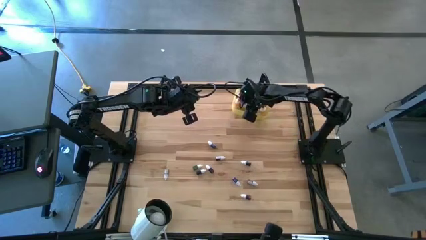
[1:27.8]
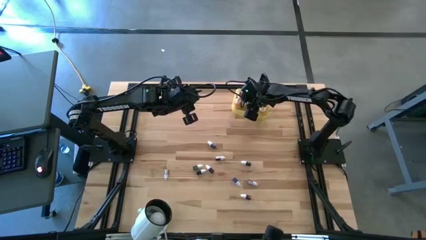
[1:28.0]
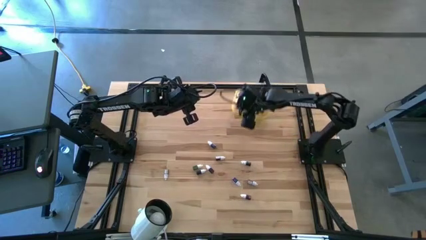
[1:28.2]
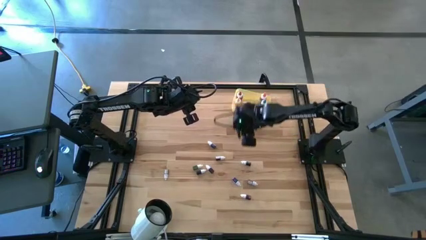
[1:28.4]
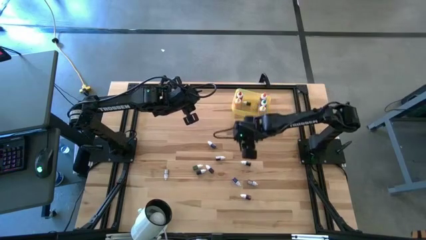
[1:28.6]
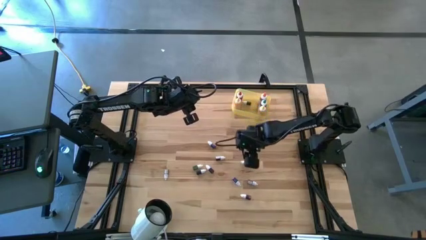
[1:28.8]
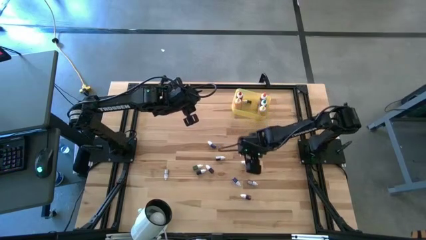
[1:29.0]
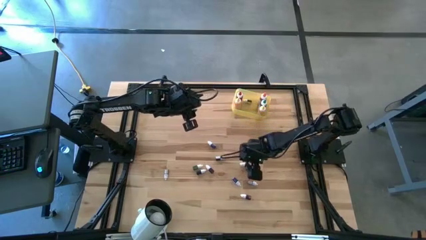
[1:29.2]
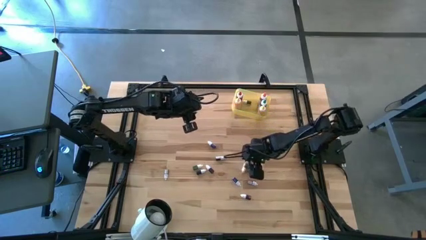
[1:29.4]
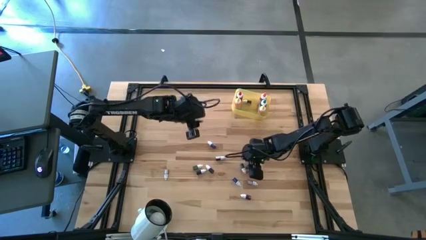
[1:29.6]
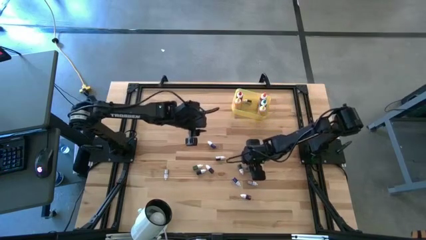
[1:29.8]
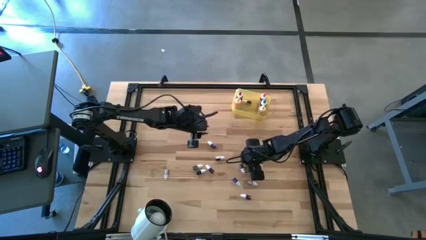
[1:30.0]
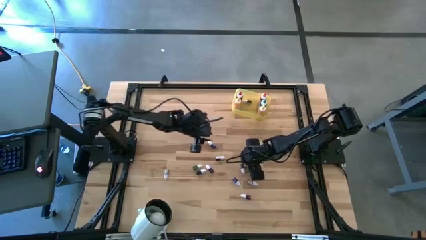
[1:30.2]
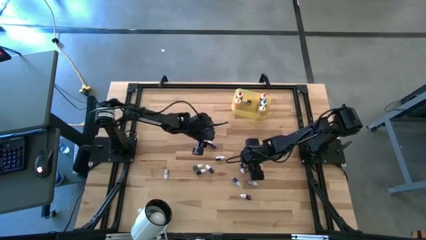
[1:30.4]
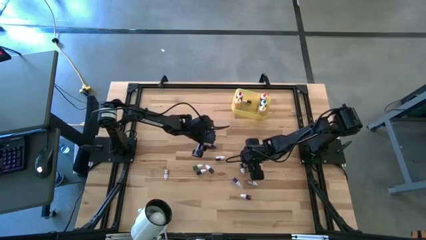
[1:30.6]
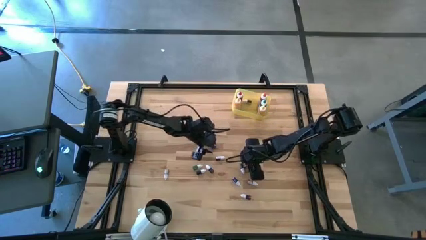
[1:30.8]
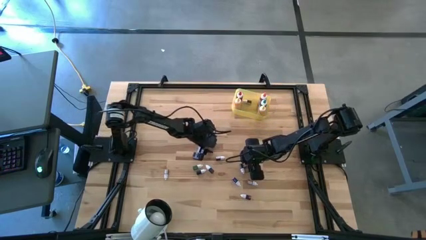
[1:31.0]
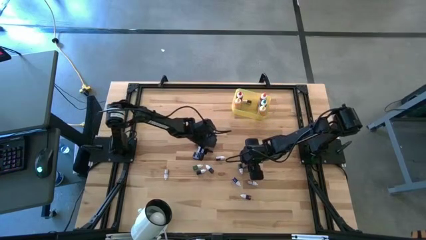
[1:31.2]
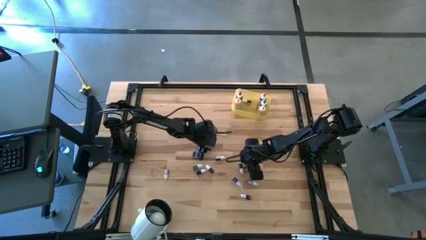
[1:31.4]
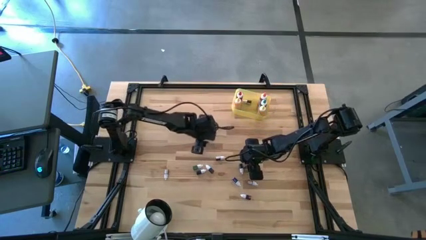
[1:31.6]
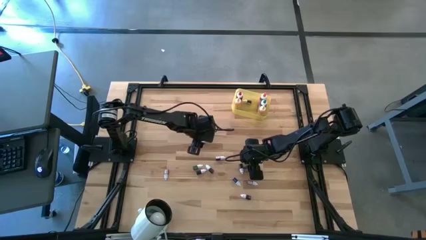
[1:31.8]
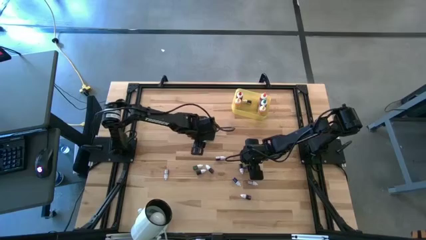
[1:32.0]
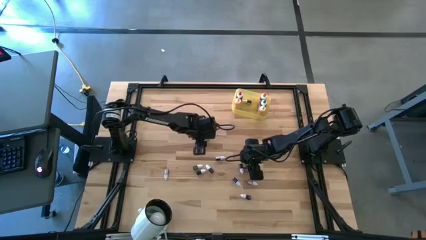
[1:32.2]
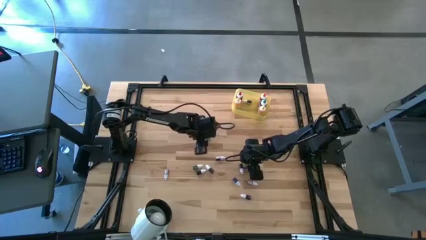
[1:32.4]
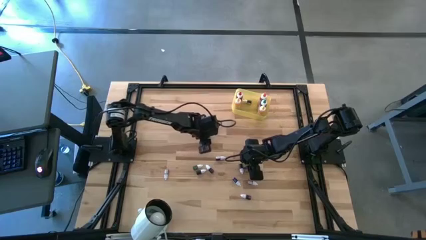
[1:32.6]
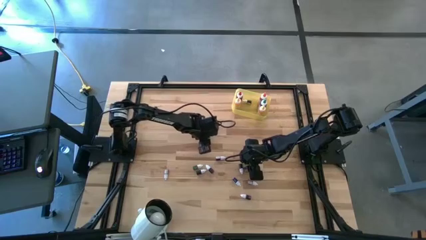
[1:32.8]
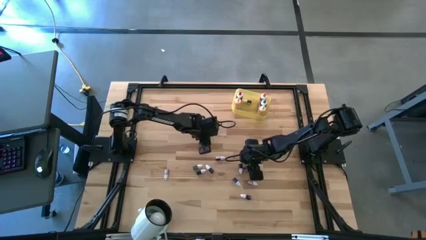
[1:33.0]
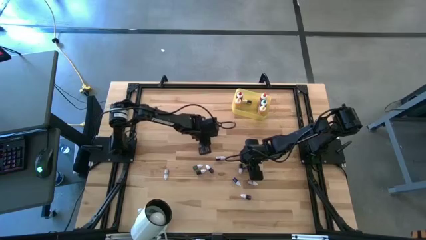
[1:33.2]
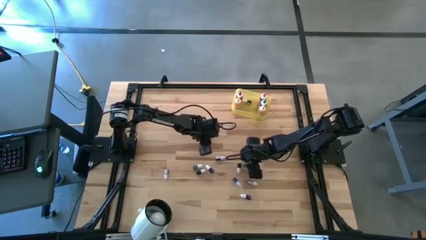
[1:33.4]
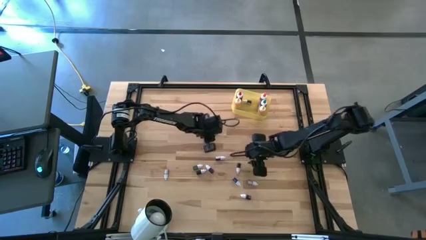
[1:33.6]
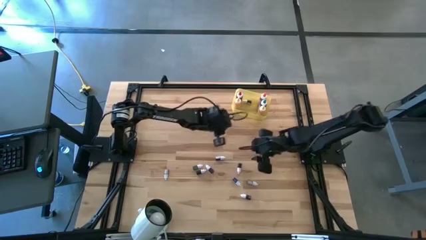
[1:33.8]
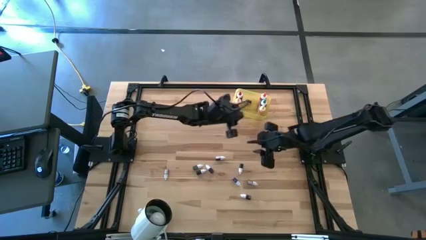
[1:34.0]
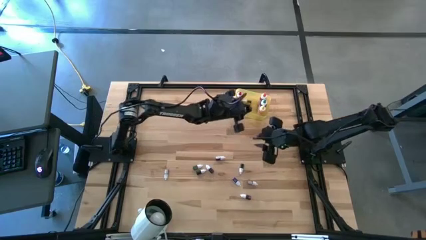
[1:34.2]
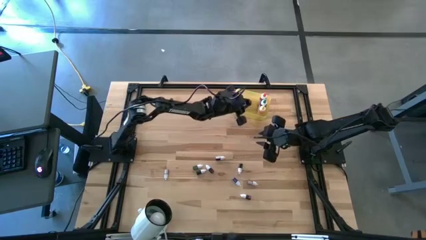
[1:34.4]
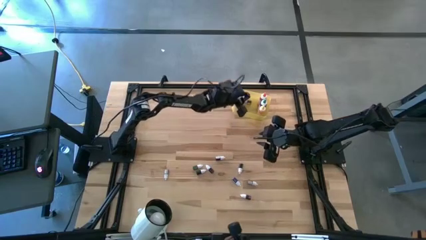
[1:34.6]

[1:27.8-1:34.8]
Task: Pick & Place food coloring
Put the small green food coloring bottle into the yellow bin

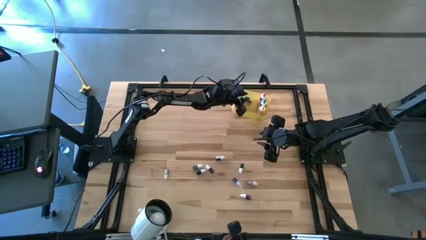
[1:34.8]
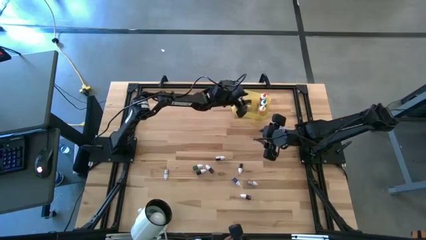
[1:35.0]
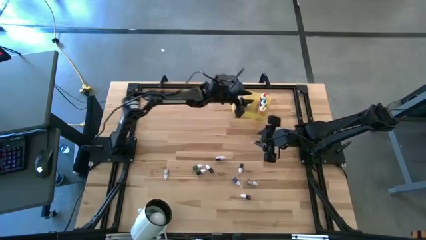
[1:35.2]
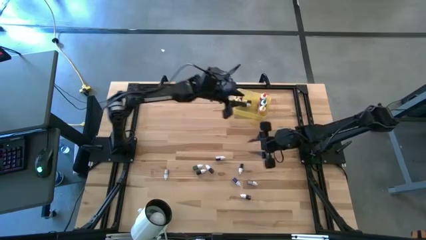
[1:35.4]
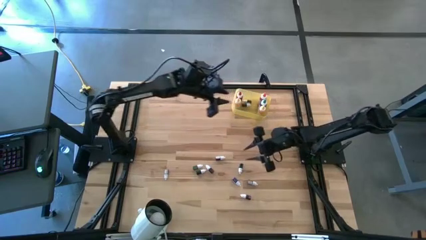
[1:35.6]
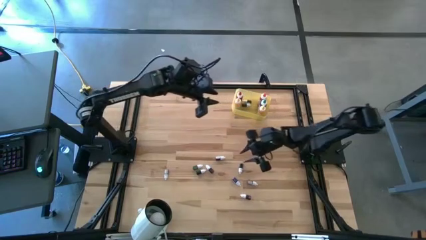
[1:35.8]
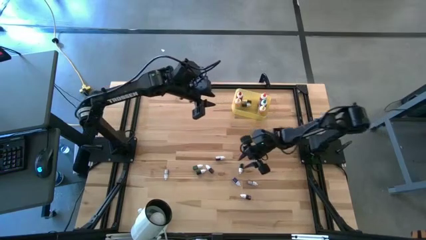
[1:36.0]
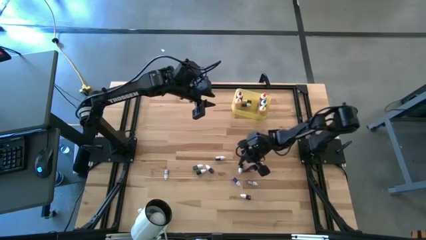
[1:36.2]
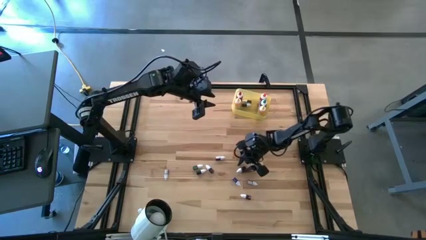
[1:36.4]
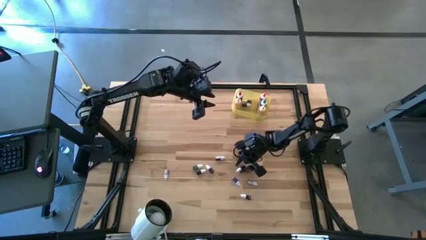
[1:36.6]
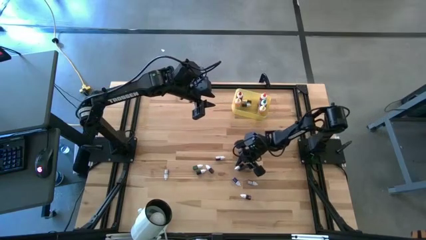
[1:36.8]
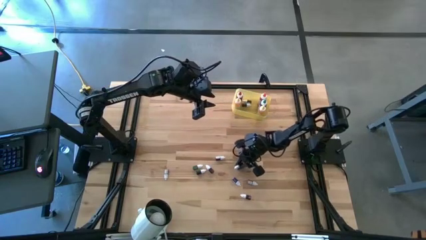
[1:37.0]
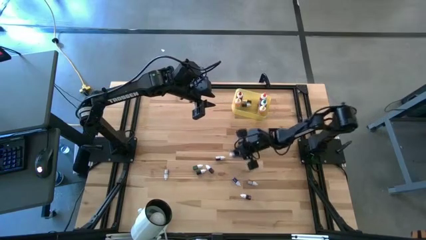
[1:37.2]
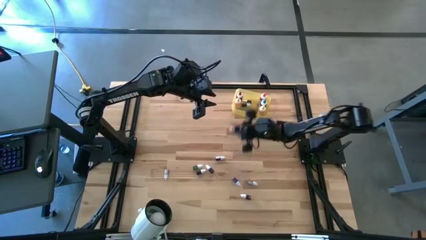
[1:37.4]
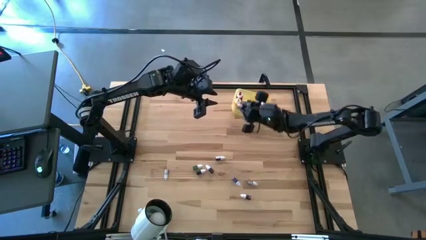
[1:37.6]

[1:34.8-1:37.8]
Put the small green food coloring bottle into the yellow bin

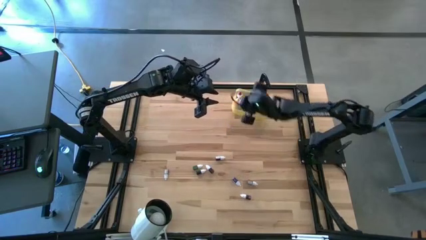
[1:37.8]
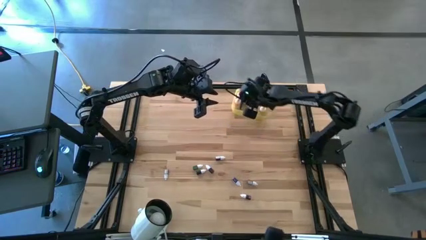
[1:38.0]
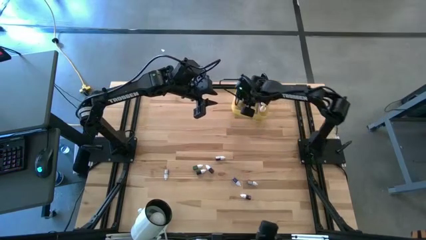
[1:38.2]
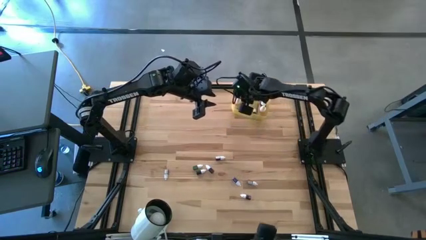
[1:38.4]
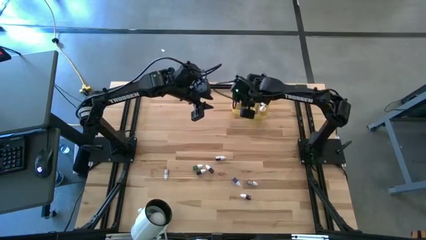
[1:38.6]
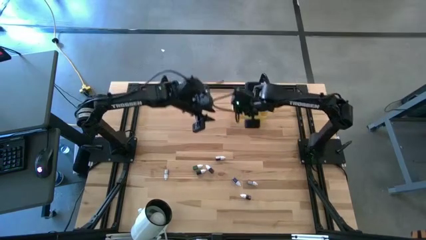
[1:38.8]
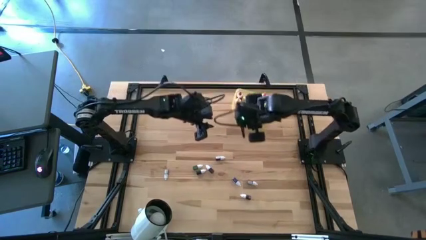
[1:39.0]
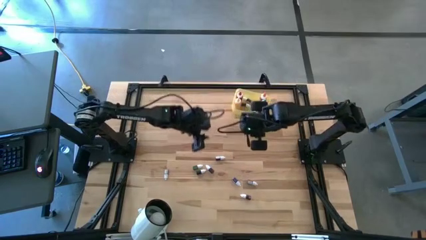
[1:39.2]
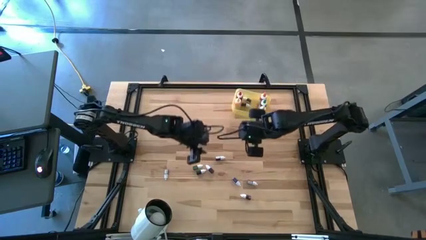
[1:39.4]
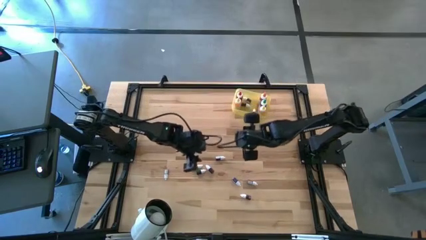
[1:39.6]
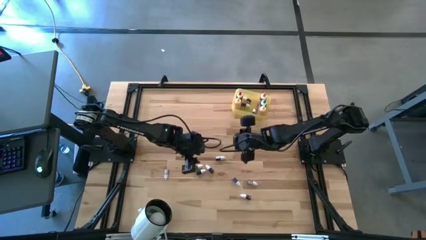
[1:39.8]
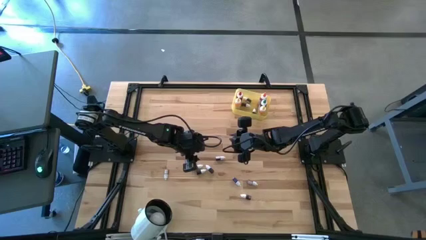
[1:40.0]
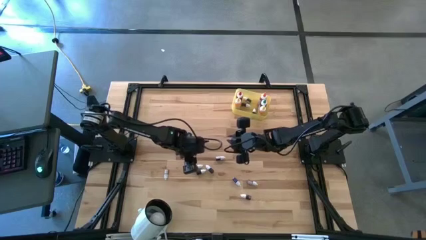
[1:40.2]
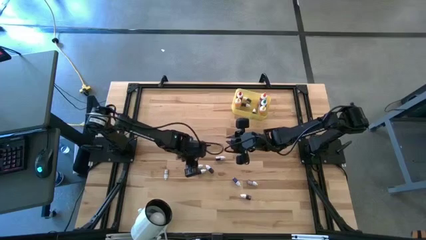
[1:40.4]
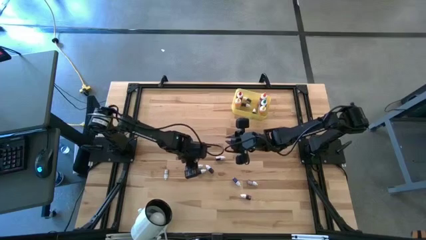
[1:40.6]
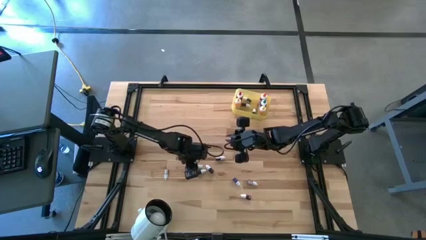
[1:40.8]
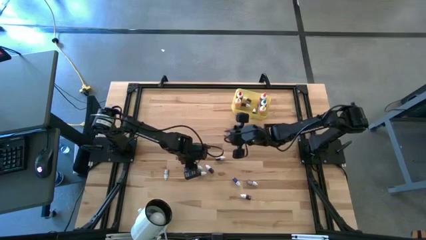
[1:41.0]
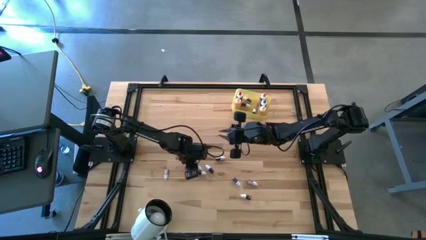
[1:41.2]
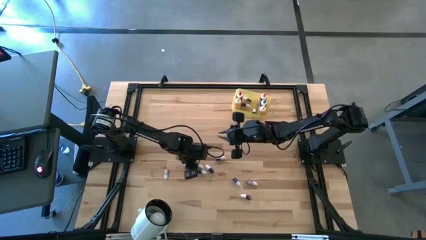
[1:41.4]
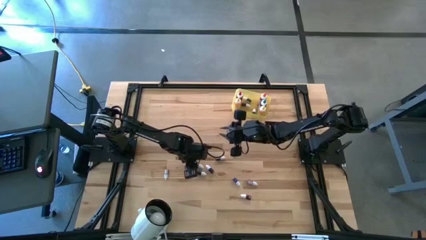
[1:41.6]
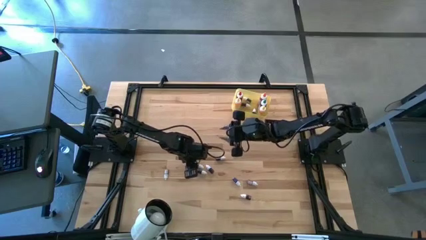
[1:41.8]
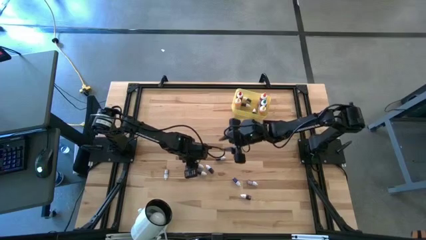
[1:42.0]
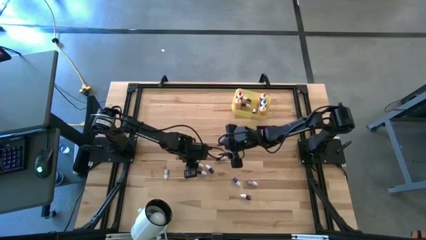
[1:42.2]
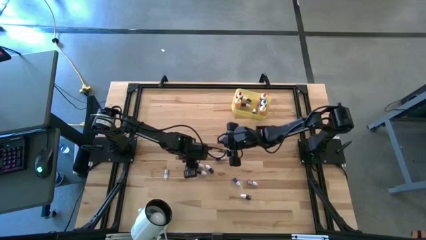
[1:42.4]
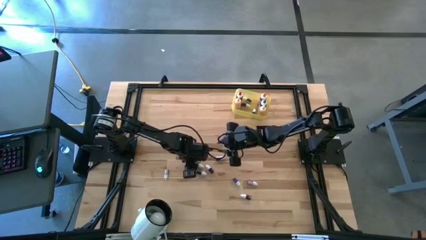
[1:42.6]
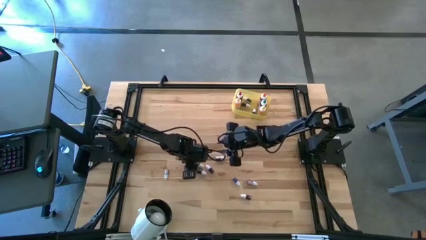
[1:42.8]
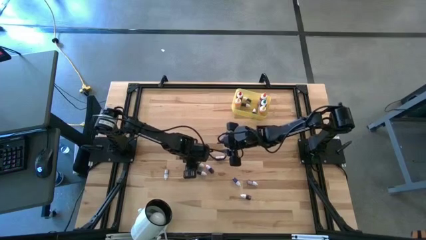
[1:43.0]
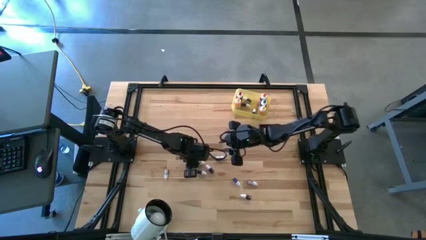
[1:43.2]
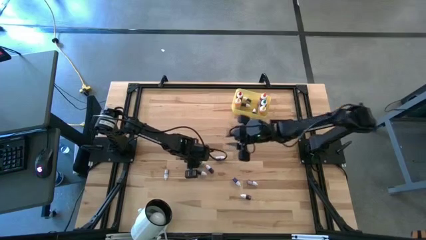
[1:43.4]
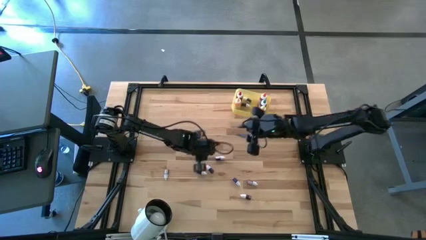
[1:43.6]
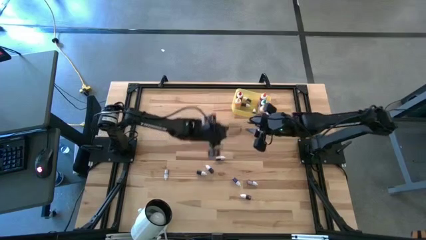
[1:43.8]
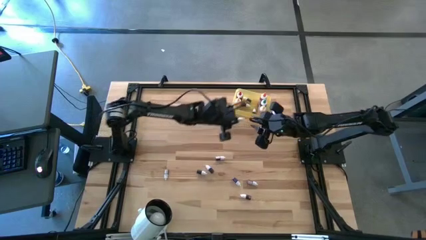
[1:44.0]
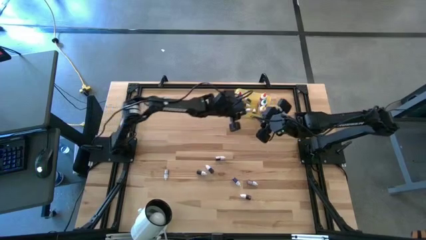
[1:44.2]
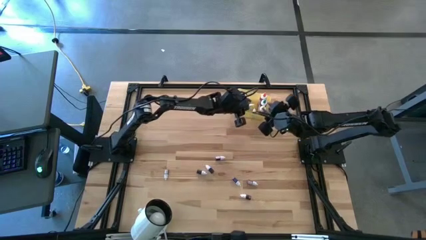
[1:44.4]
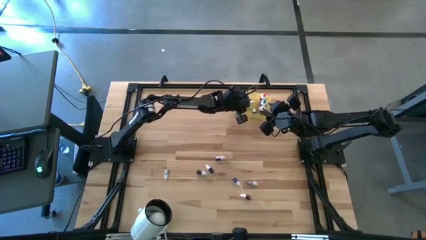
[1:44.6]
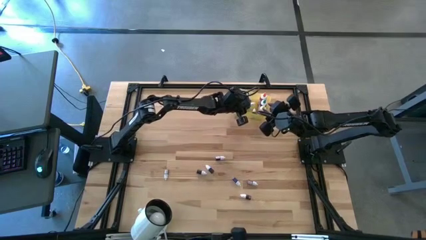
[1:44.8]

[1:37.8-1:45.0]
Put the small green food coloring bottle into the yellow bin
